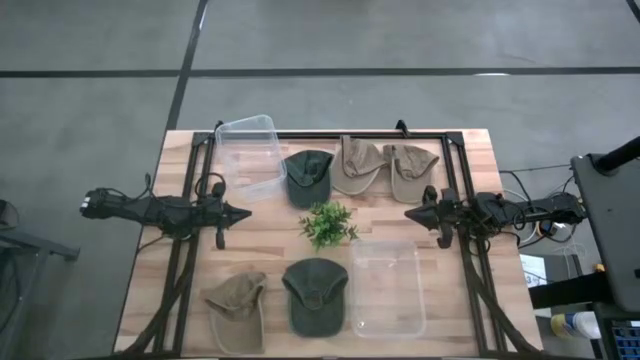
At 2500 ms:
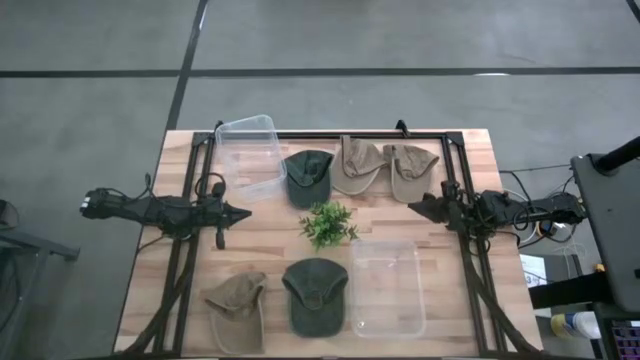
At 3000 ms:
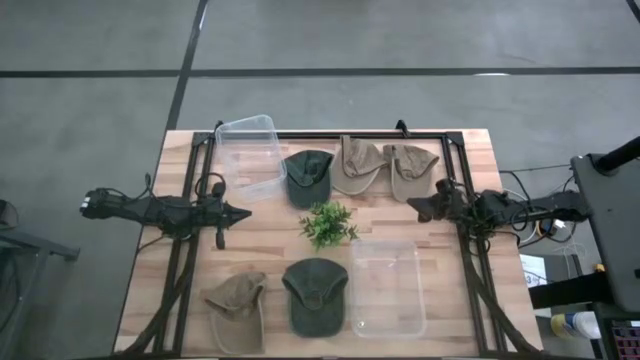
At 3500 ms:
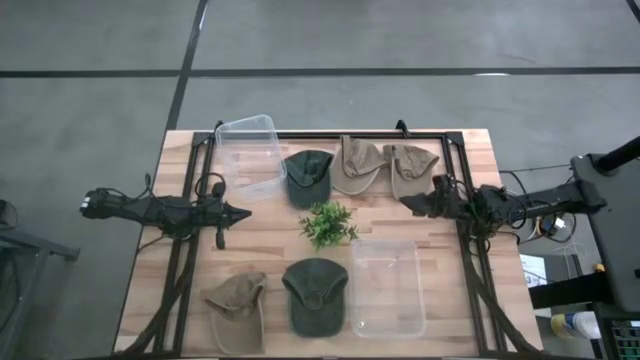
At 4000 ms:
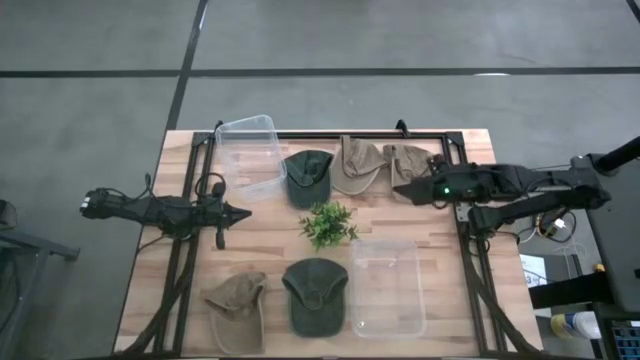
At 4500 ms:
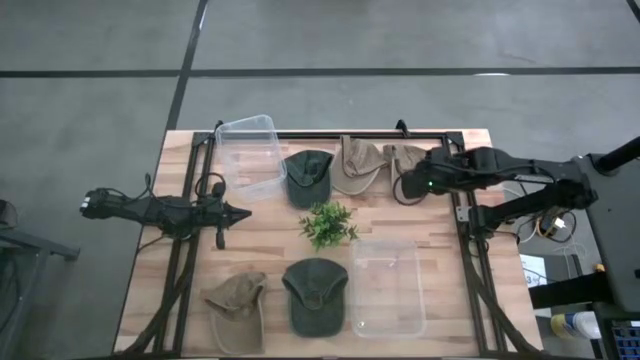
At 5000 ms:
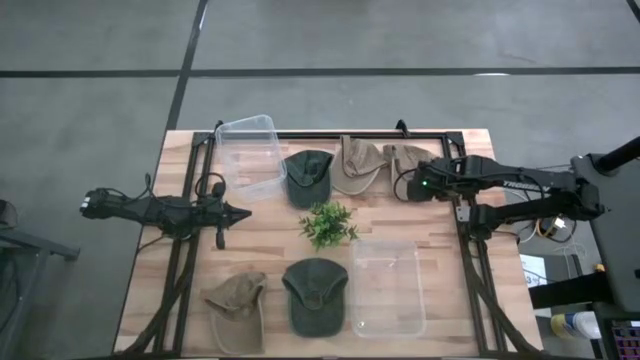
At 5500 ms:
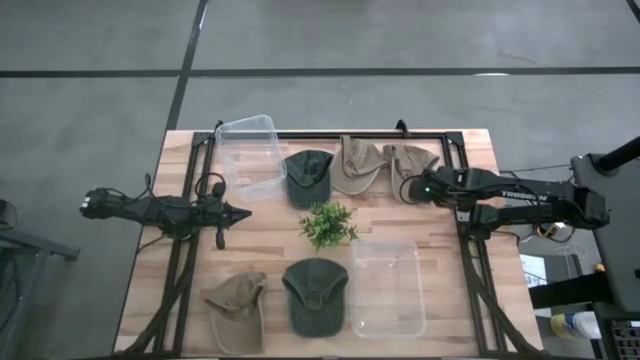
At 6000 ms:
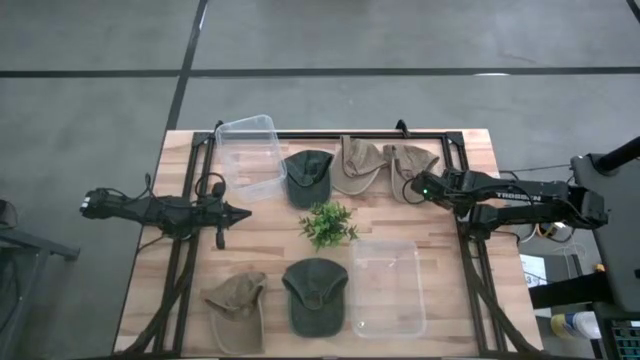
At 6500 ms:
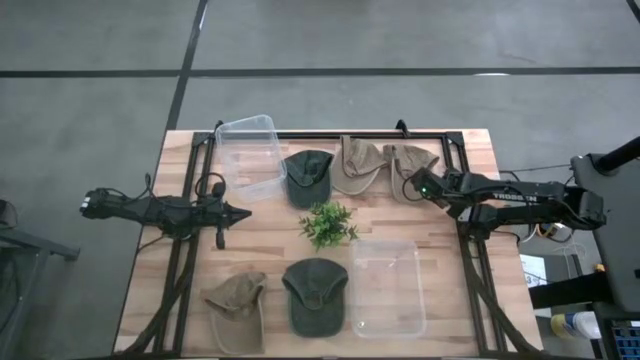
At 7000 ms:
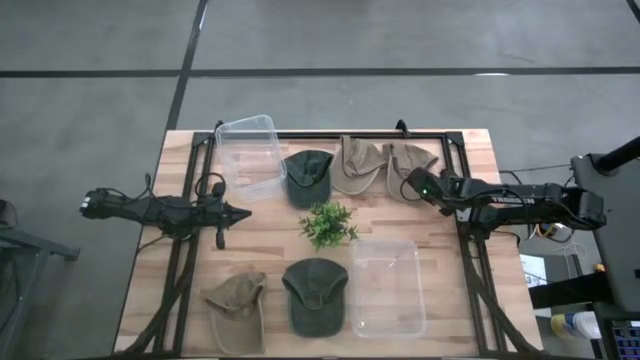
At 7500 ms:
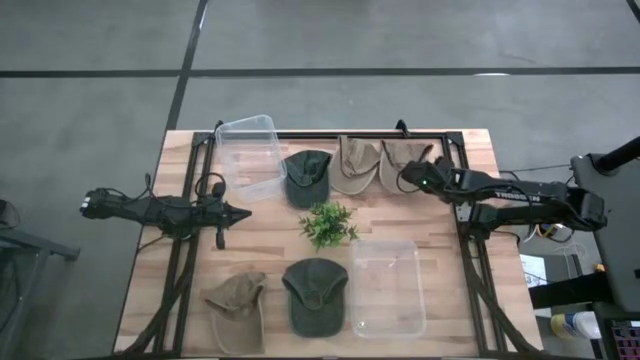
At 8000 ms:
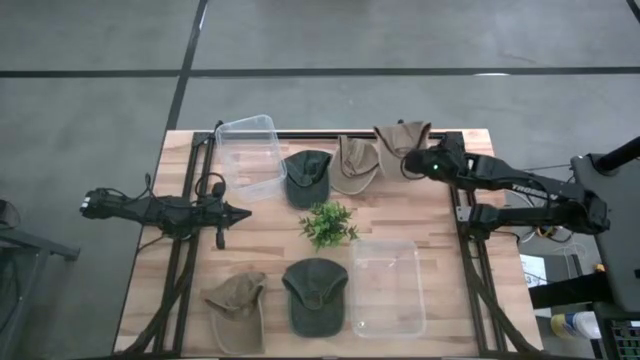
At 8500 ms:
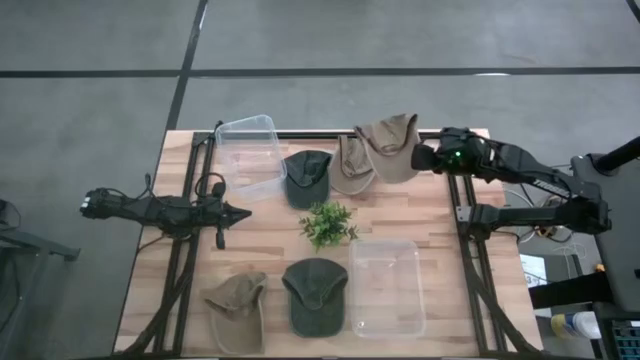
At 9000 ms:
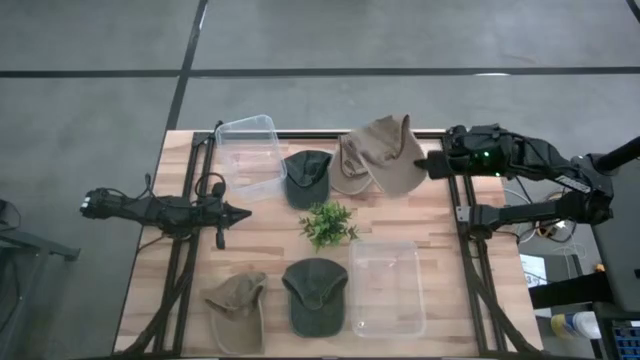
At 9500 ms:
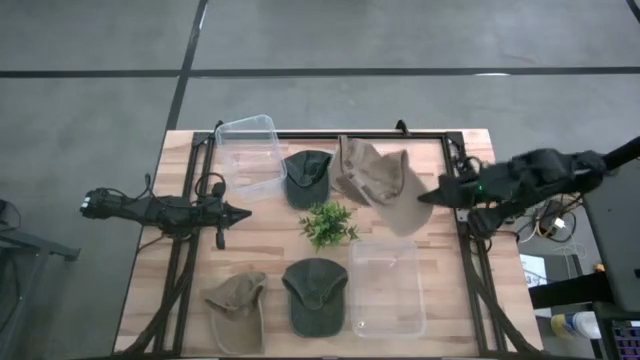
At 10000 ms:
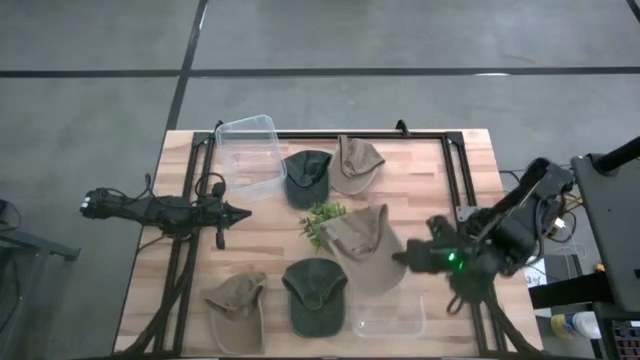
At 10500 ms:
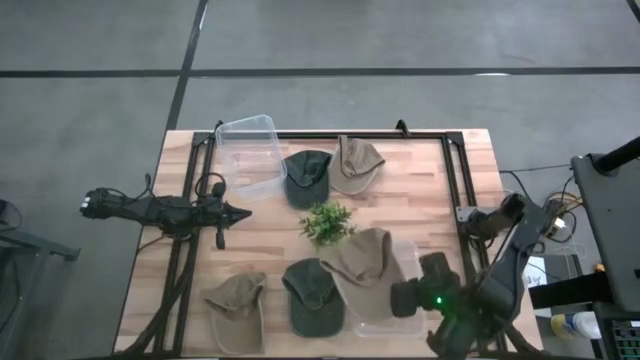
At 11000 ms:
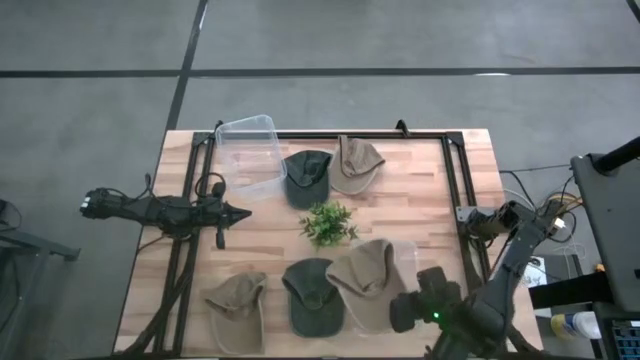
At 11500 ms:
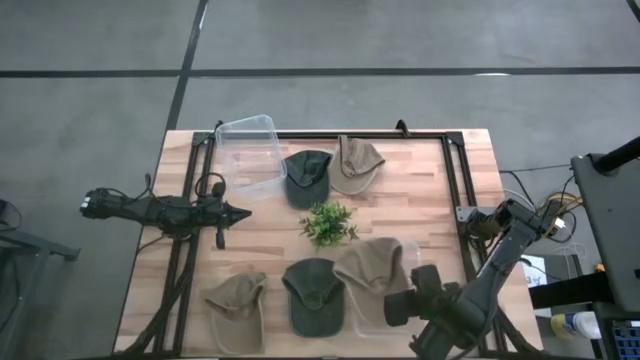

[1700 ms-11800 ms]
Task: Pick & Place hat
Put the right brown cap into the top transparent bin

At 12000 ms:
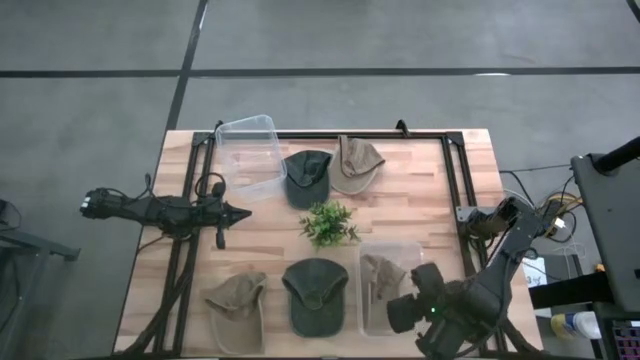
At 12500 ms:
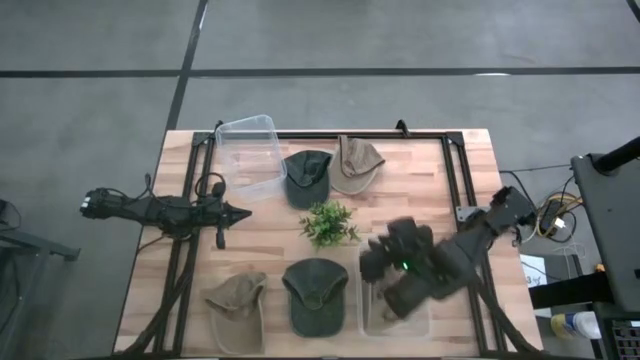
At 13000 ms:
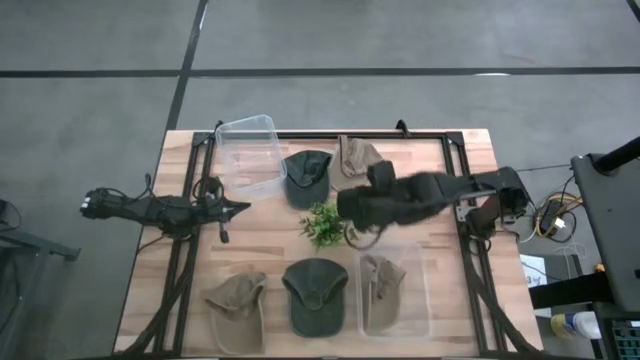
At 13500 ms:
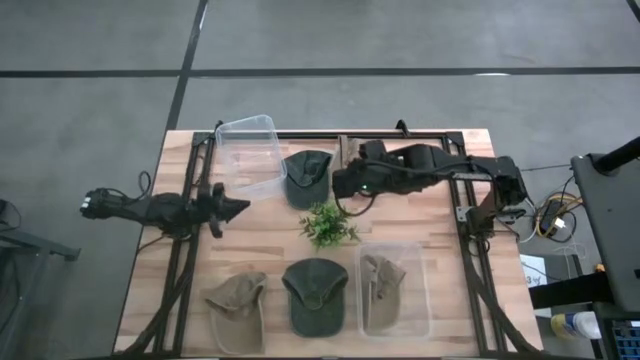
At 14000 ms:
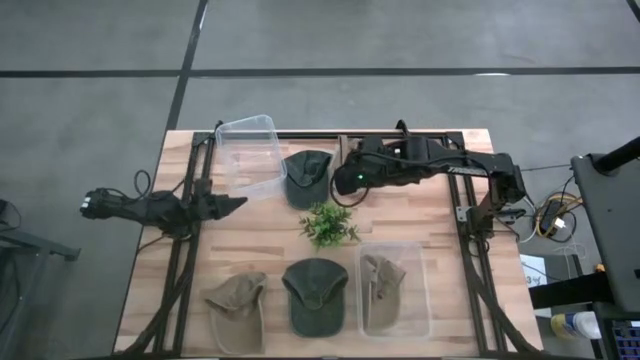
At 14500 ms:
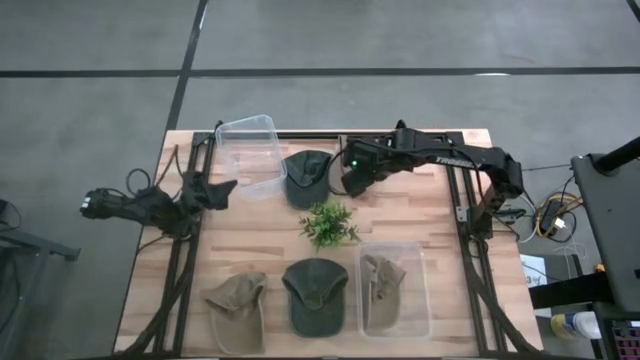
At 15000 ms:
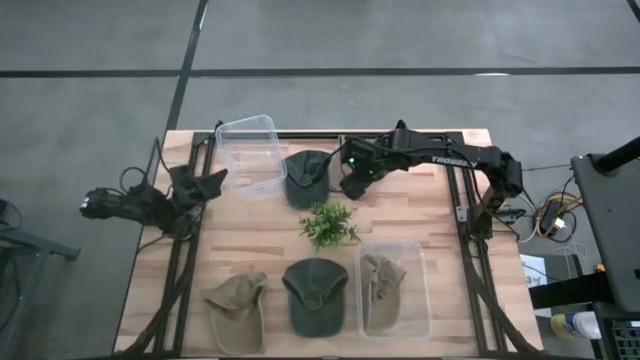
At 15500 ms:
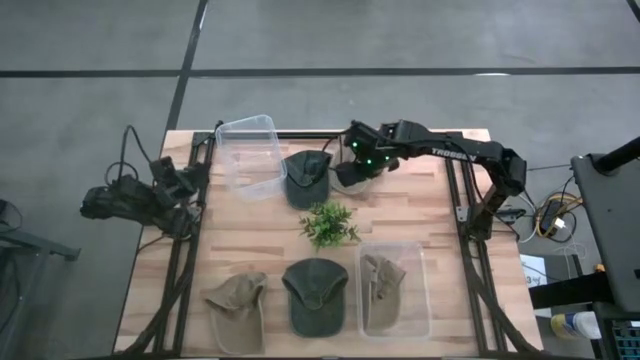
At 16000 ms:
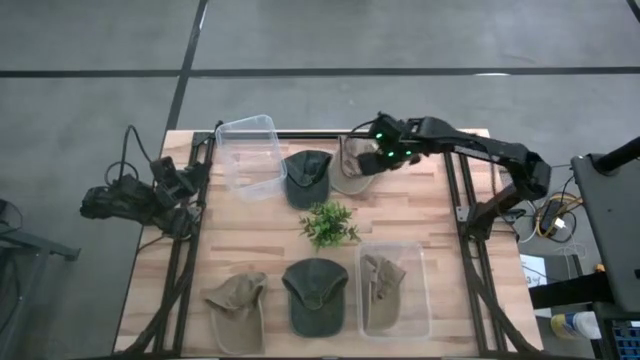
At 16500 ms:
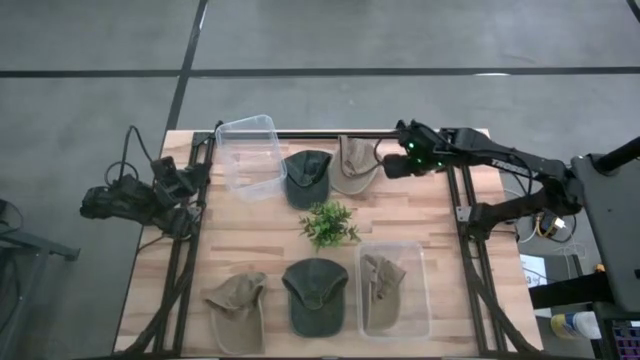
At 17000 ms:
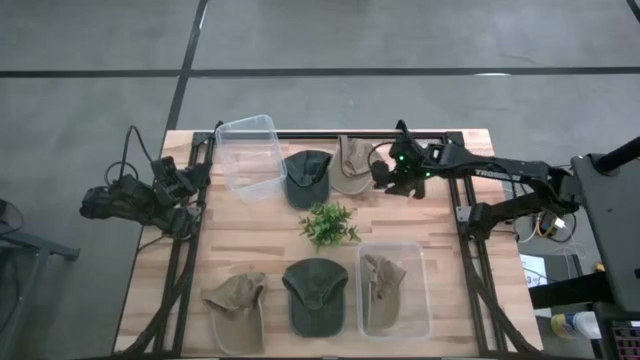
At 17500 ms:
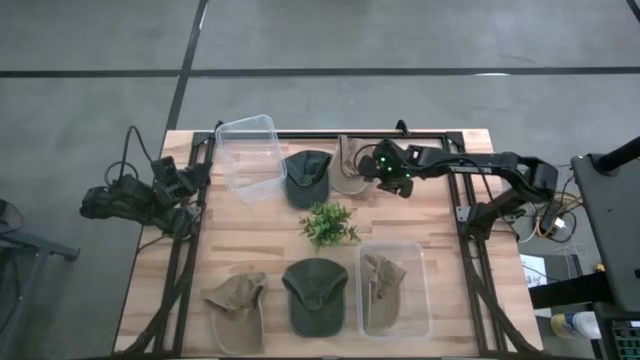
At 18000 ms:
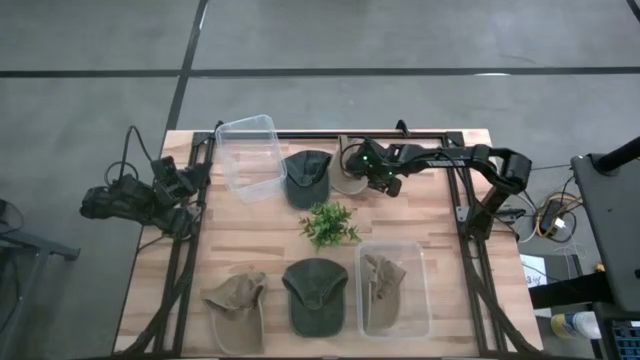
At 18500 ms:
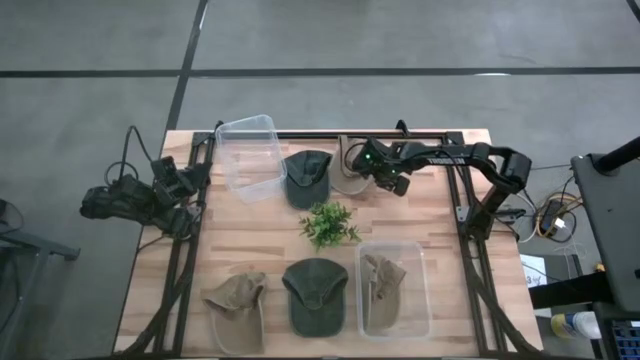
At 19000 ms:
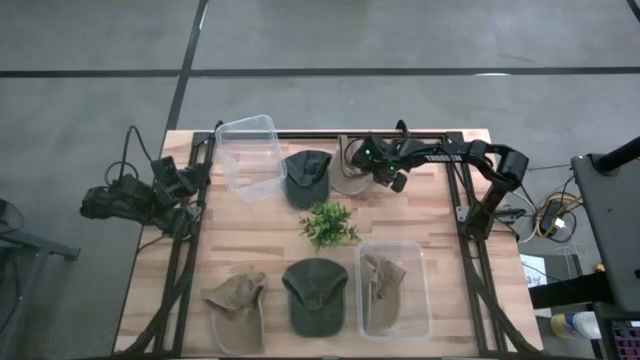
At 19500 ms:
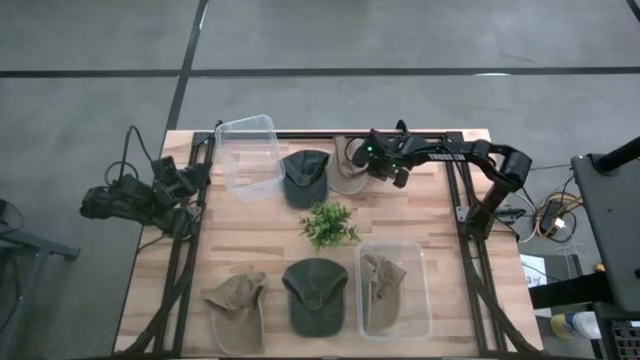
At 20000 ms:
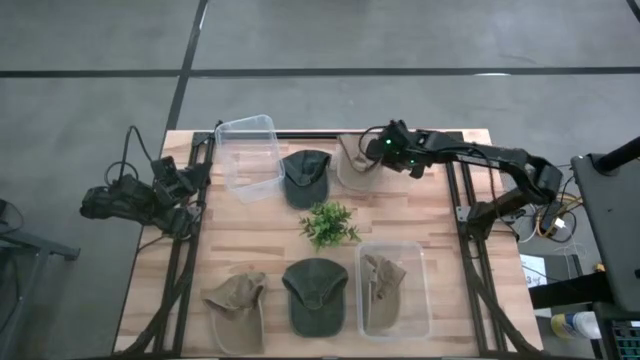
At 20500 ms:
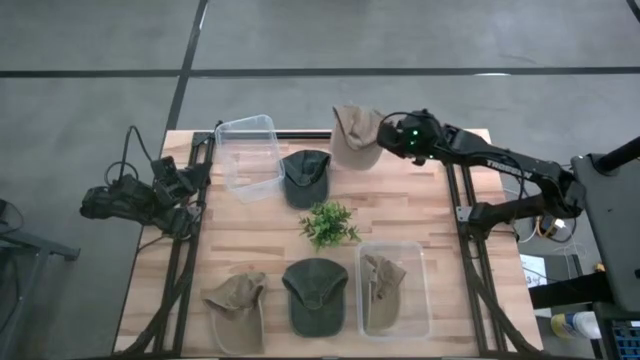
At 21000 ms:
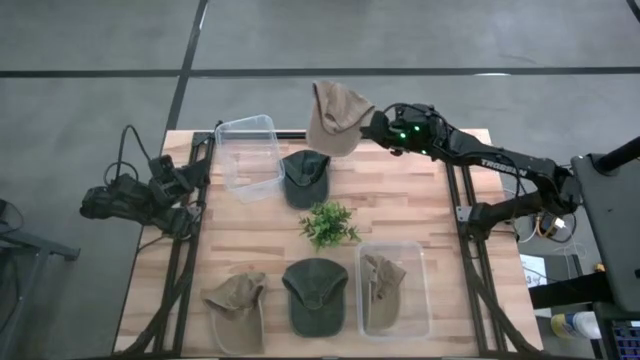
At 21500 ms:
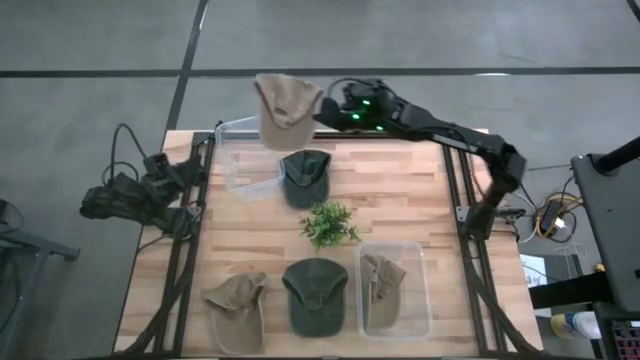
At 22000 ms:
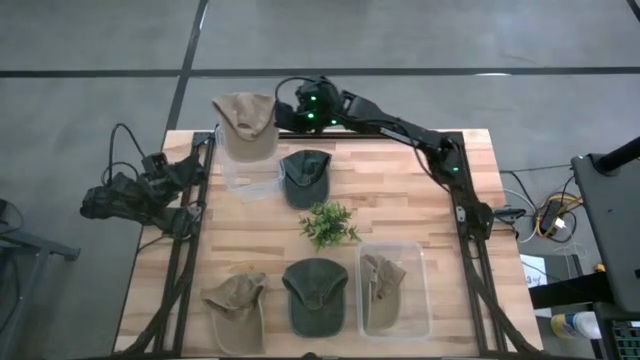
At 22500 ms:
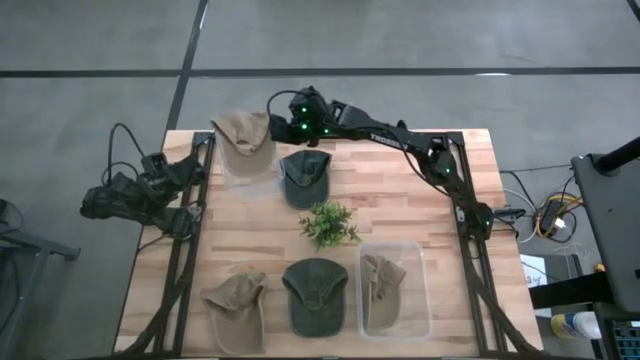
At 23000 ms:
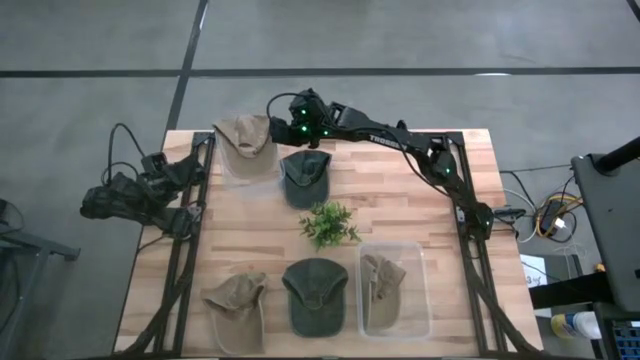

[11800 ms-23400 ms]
Put the top brown cap into the top transparent bin

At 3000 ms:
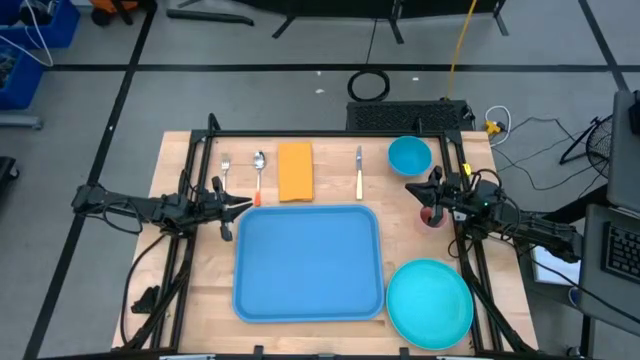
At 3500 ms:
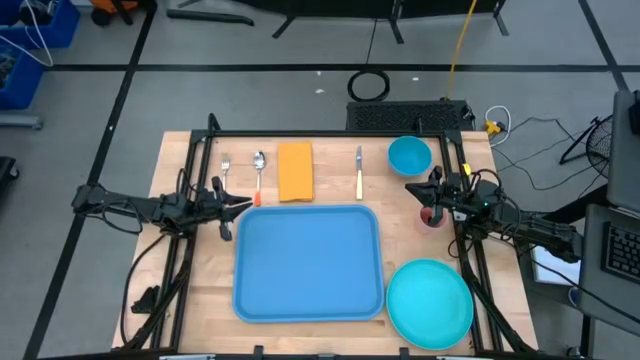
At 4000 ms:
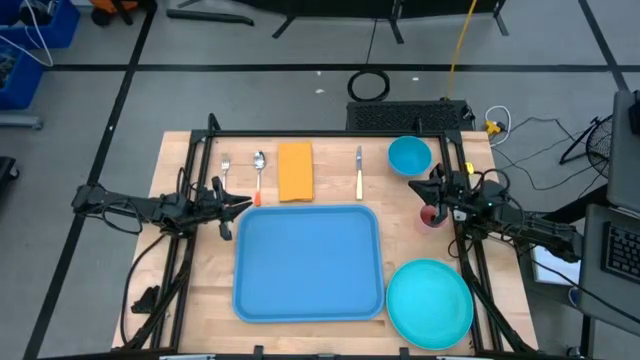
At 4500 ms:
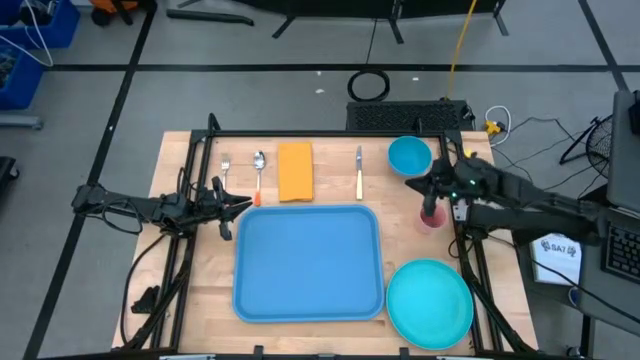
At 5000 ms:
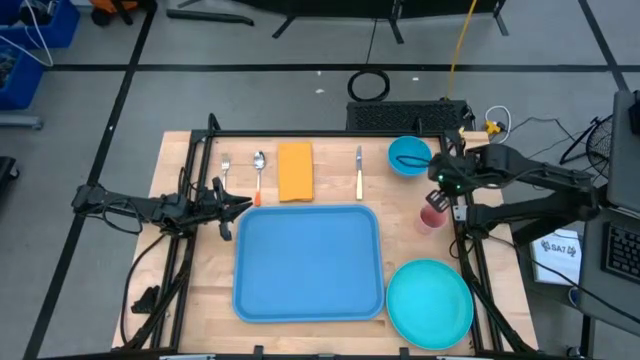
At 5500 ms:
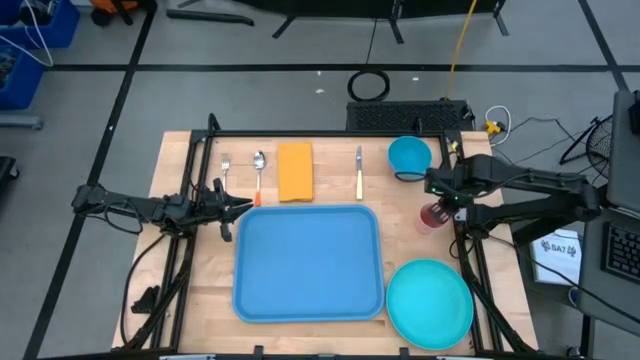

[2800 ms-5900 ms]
Task: Set up tray
Put the pink cup on the top right corner of the blue serving tray
